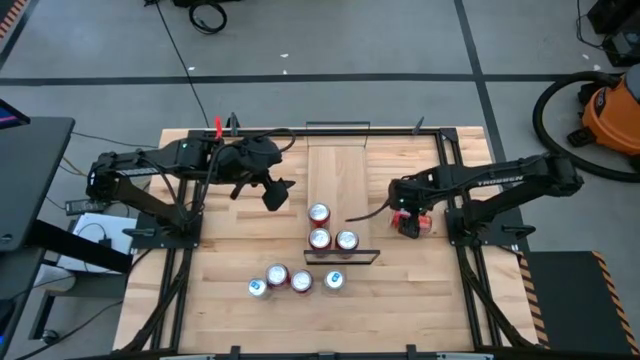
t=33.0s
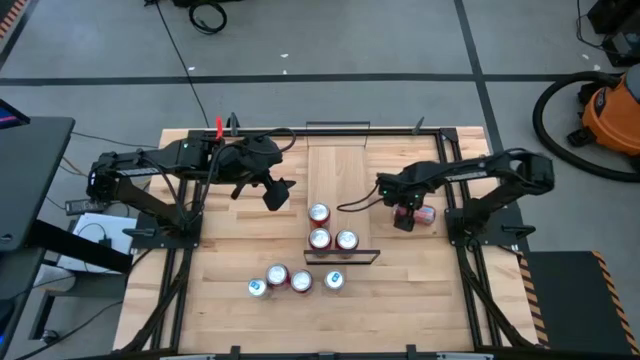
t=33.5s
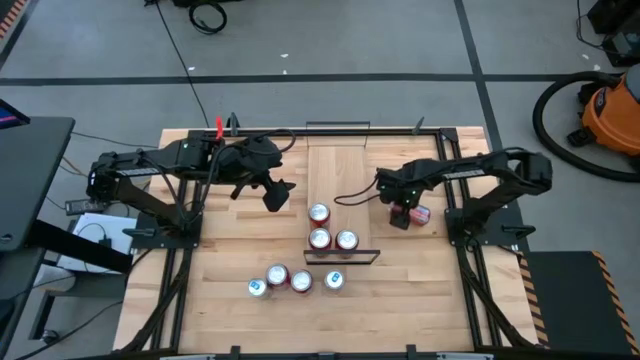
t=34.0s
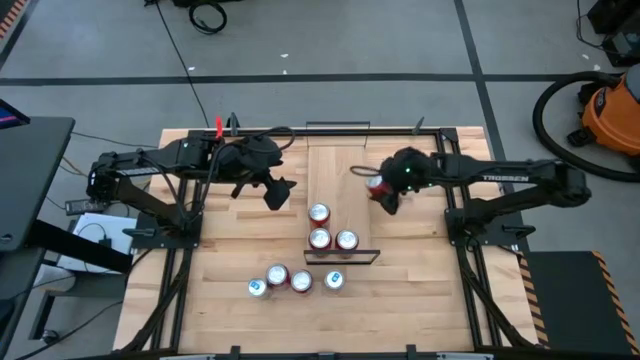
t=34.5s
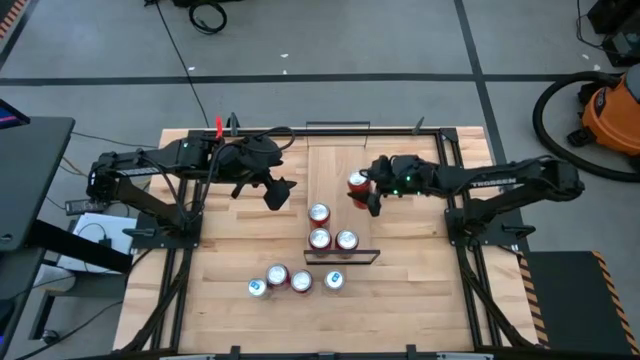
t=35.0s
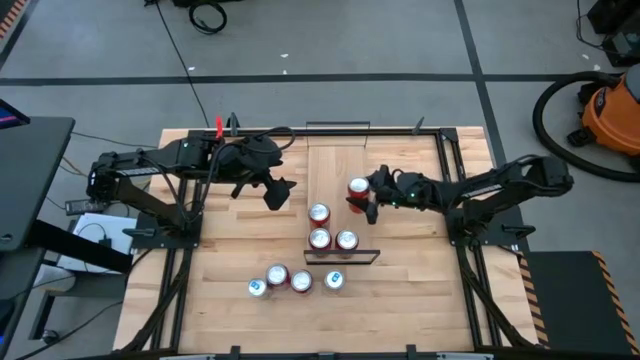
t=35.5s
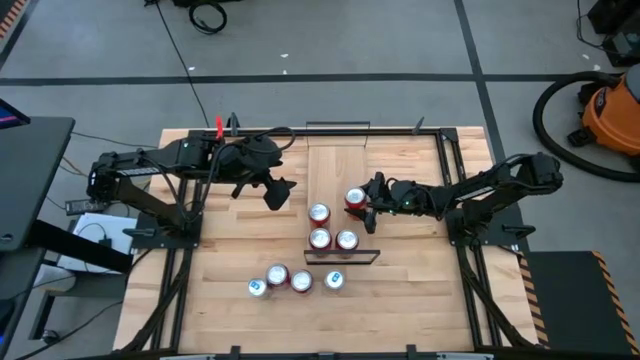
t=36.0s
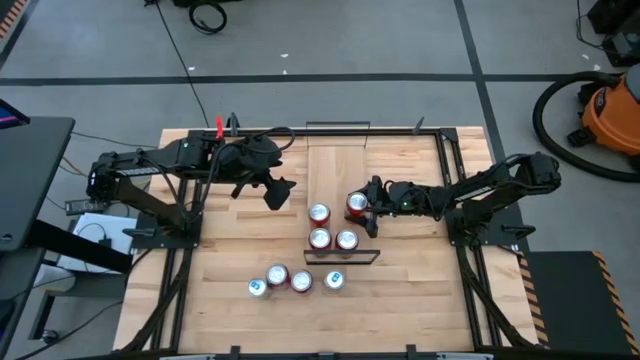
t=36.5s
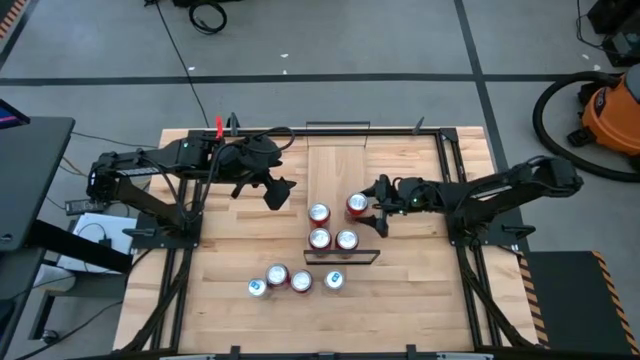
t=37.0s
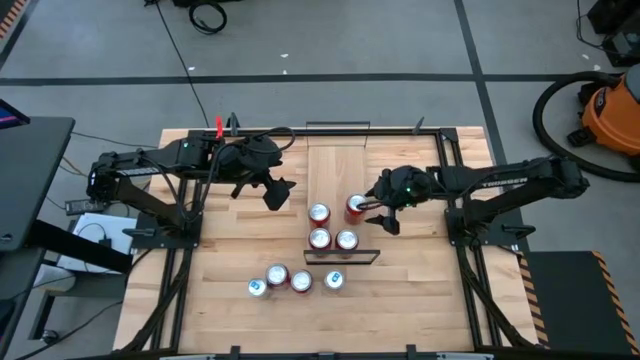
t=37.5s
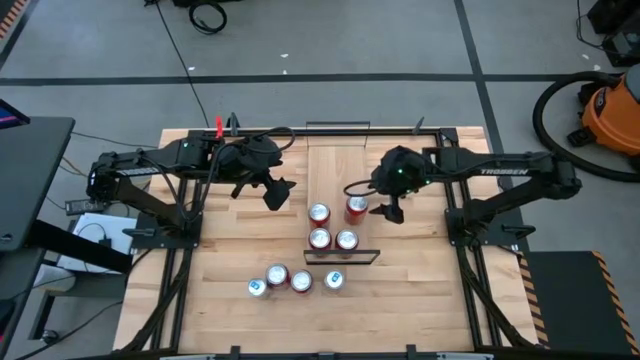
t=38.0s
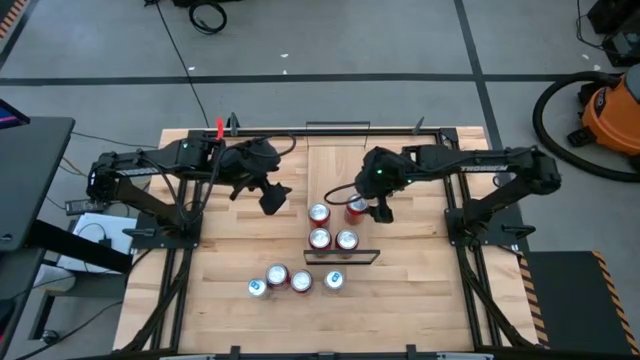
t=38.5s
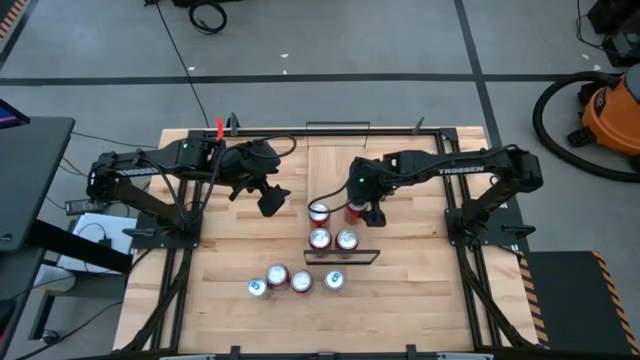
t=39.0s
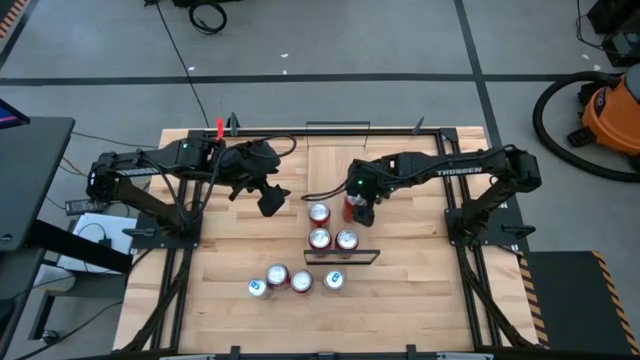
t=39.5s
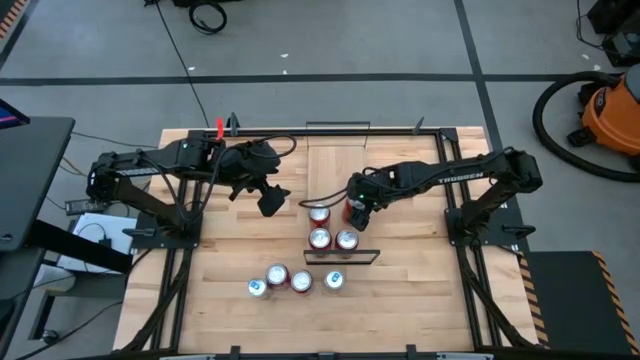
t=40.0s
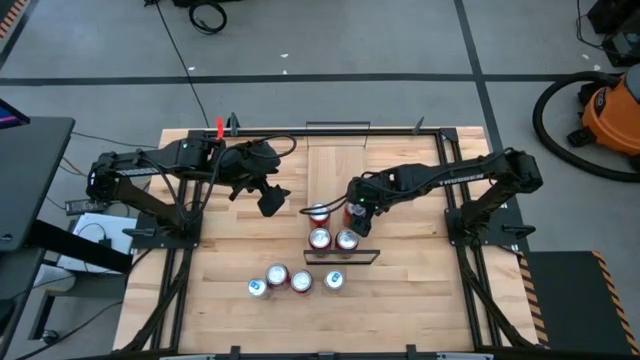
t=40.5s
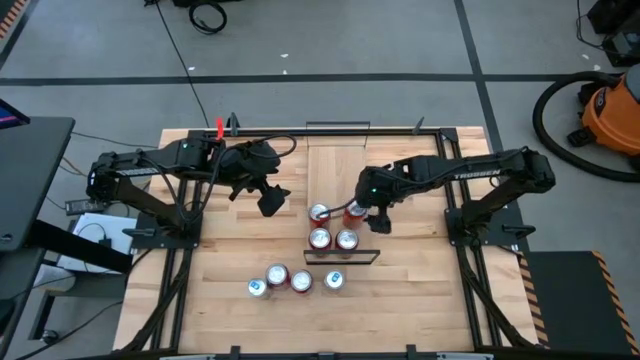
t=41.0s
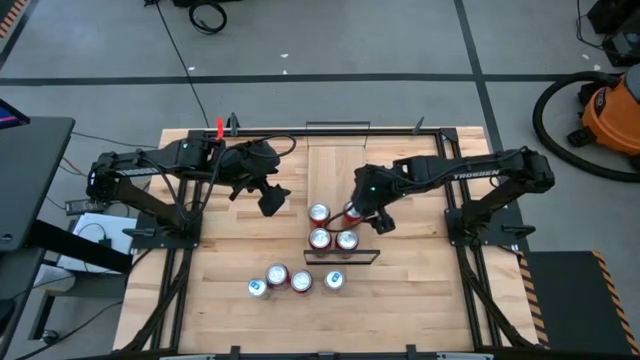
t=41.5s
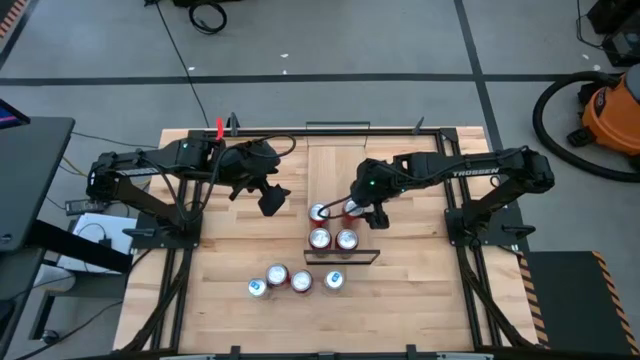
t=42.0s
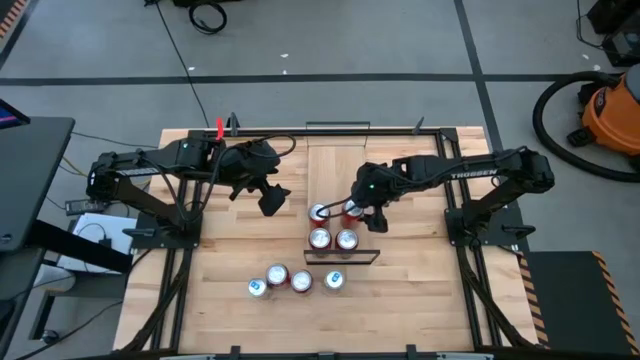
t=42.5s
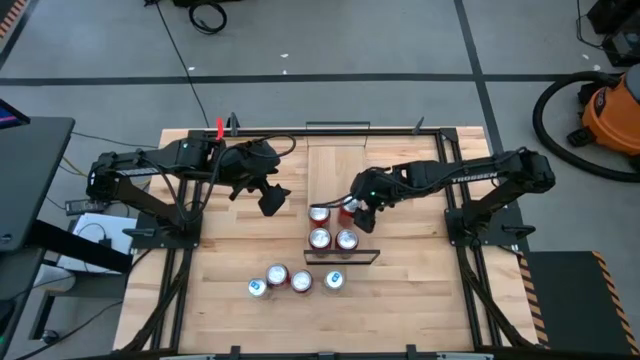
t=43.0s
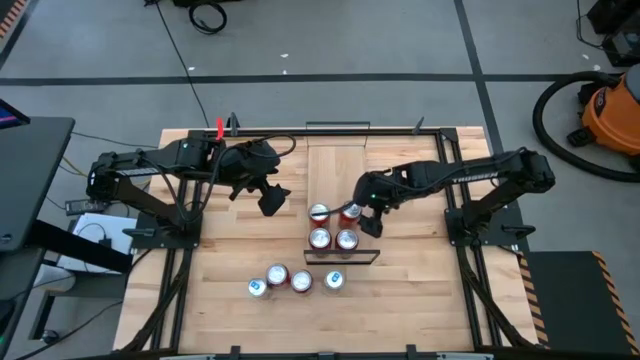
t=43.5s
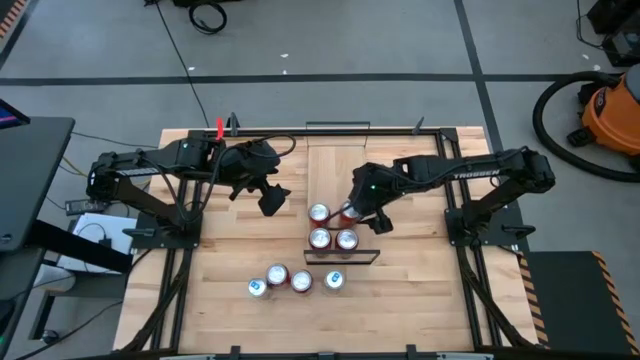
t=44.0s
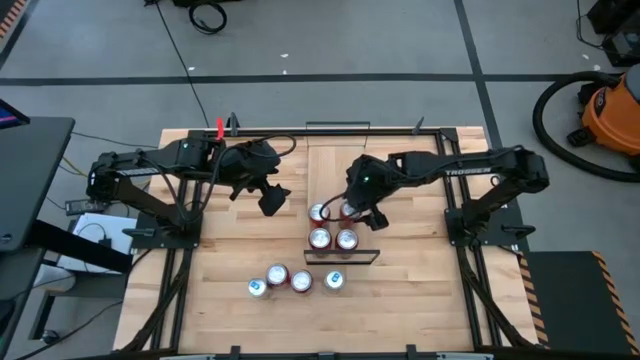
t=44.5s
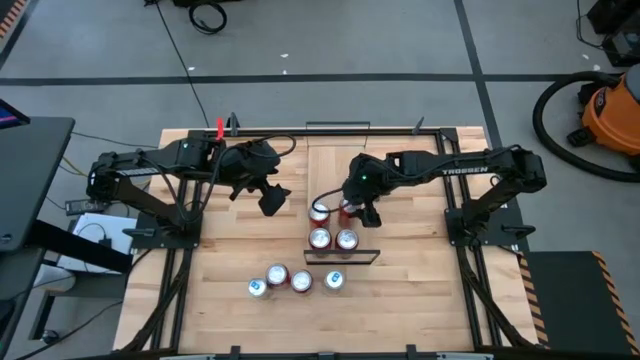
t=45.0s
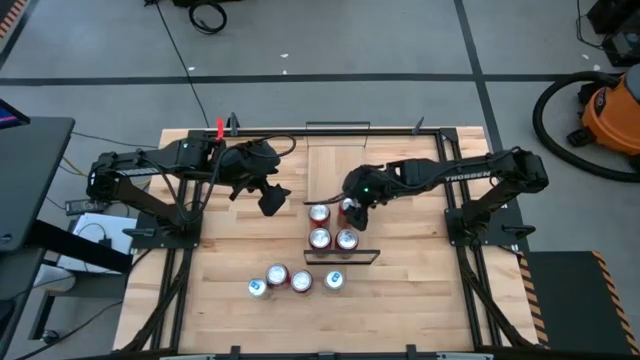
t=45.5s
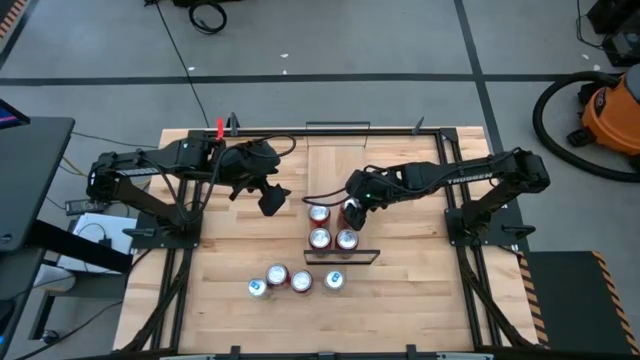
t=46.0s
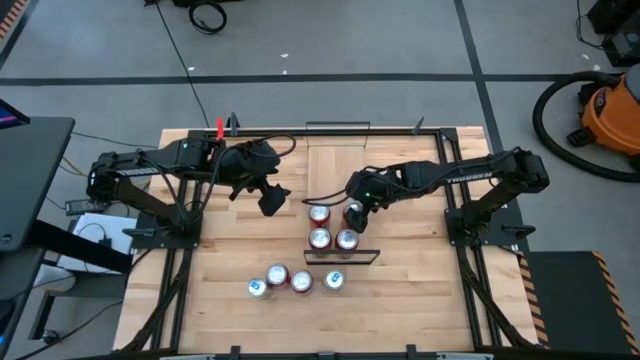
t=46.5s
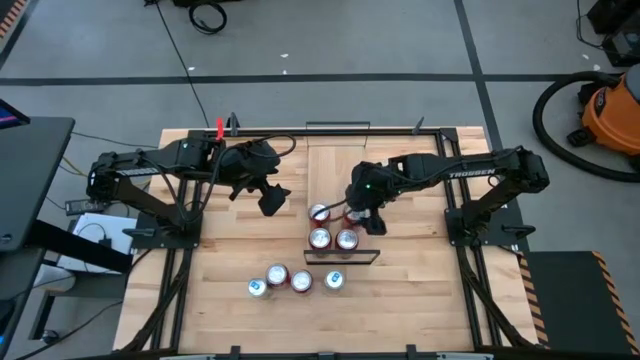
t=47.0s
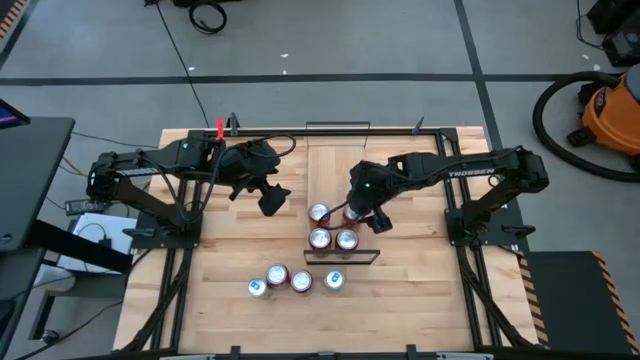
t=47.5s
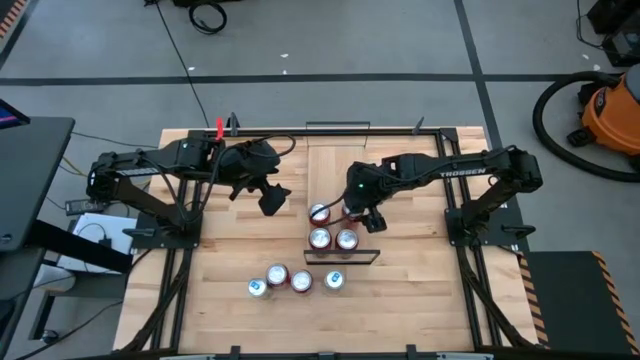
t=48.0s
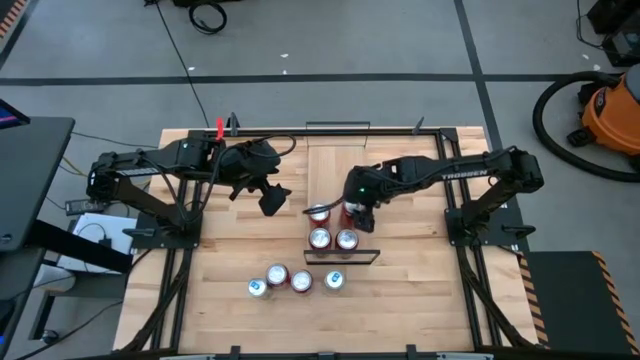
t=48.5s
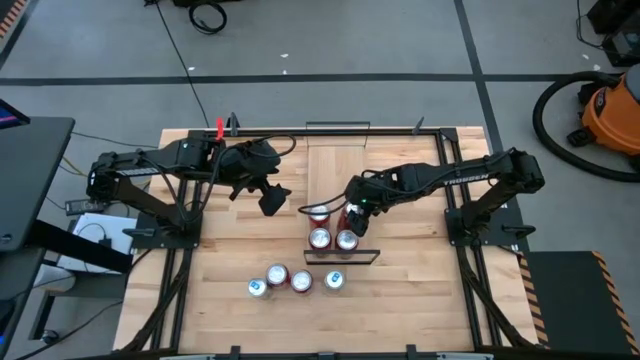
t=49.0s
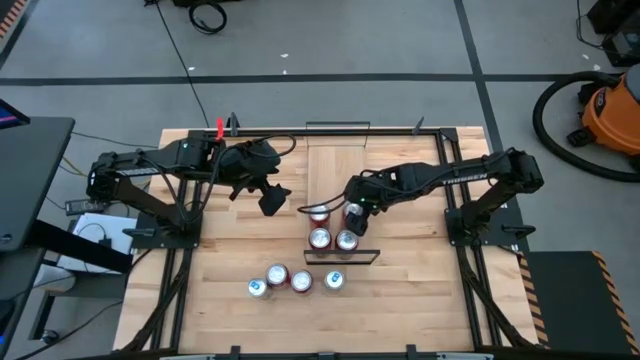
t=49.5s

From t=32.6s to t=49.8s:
Task: Place canned beverage on shelf
Put the red soda can on the shelf aligned with the other red soda can

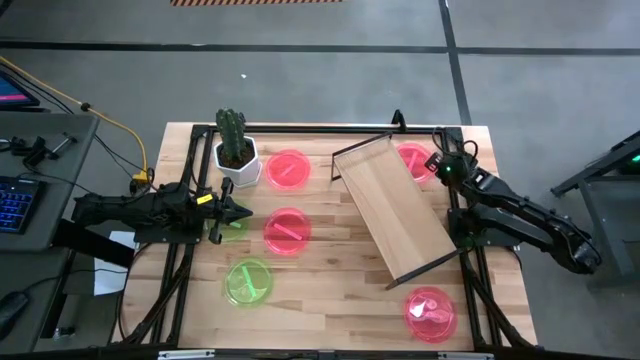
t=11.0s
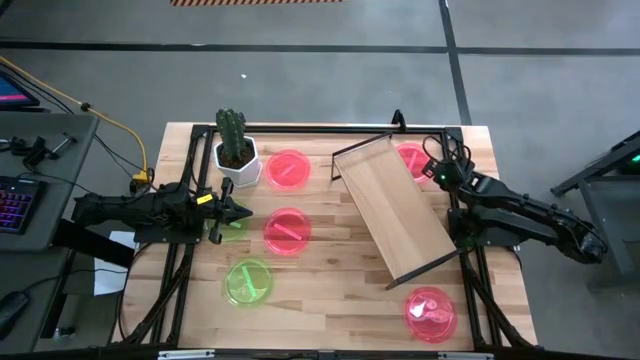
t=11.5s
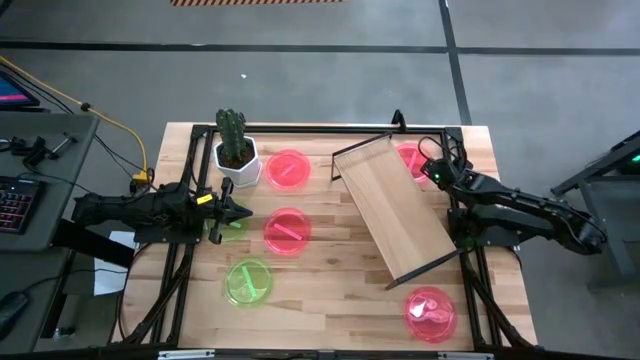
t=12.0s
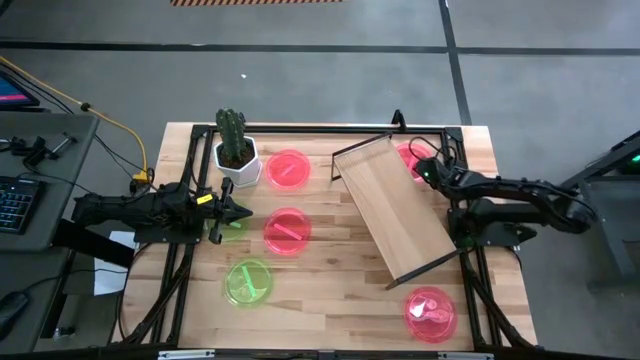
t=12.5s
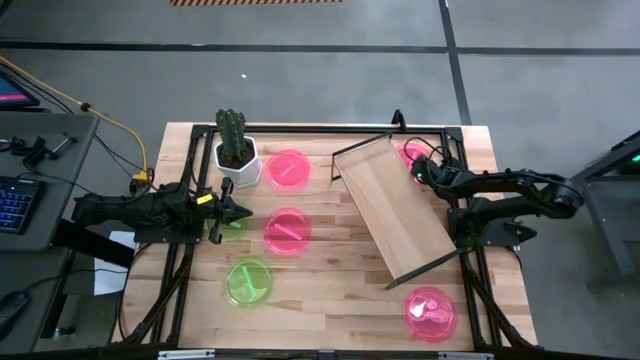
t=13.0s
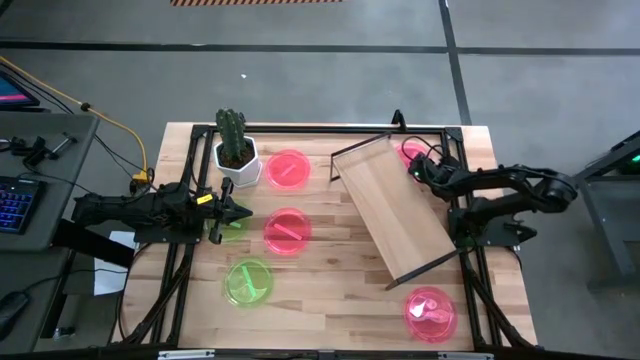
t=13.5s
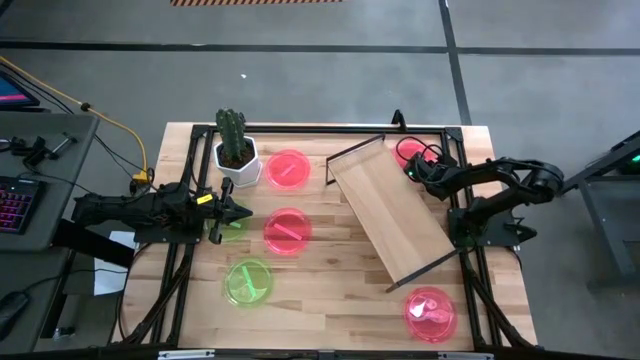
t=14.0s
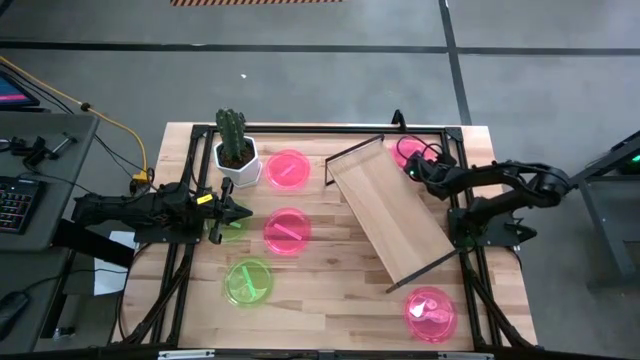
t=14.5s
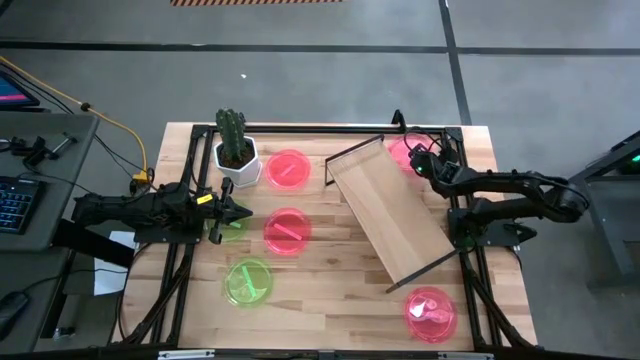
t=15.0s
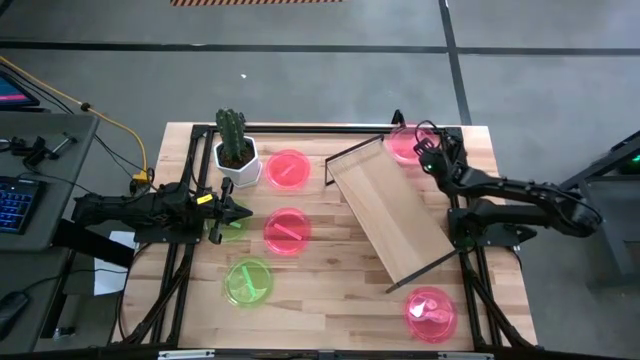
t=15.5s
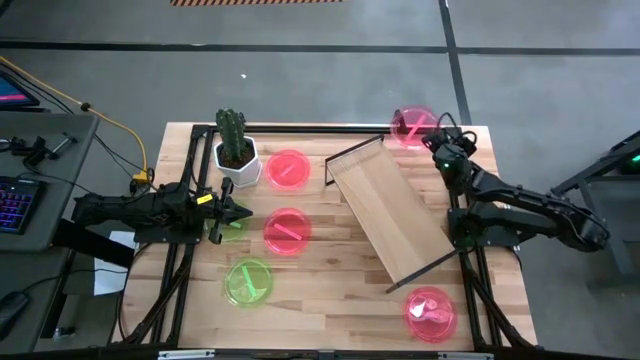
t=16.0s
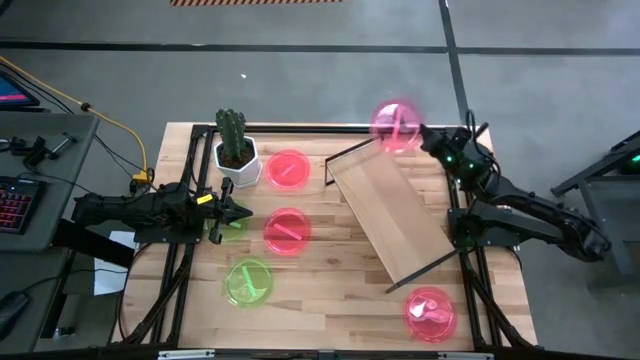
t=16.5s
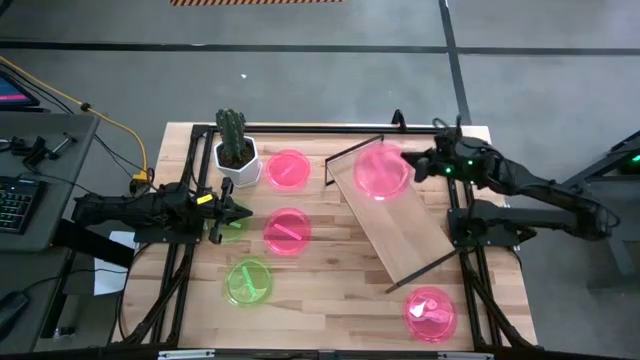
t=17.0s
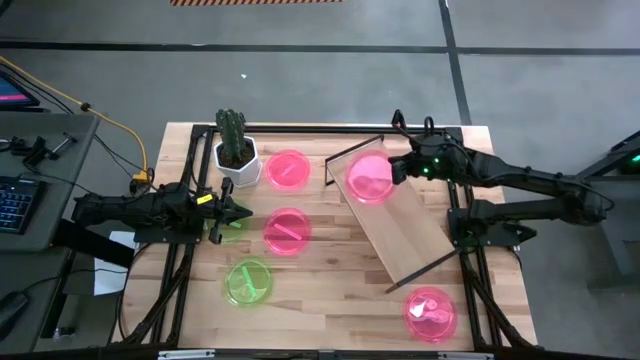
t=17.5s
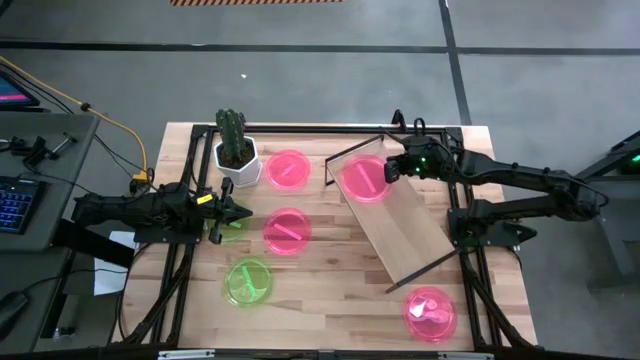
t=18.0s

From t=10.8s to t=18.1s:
Task: Place and stack plates onto a shelf
Put the pink plate on the shelf
